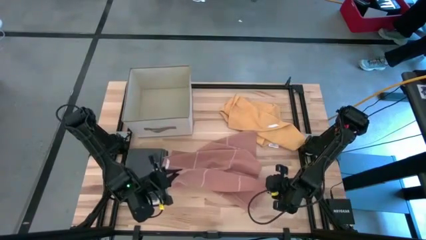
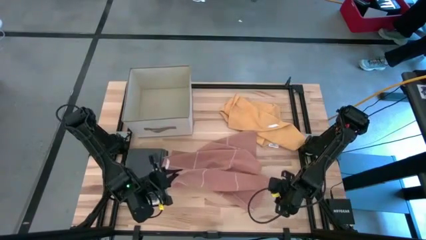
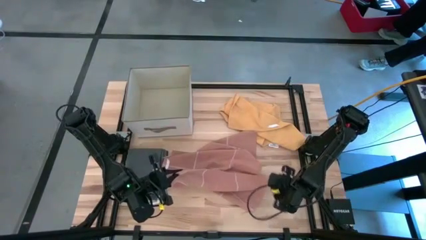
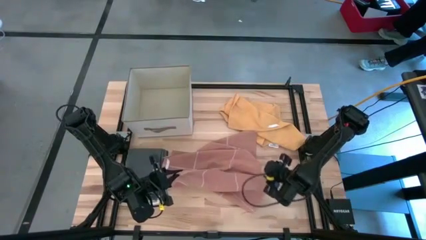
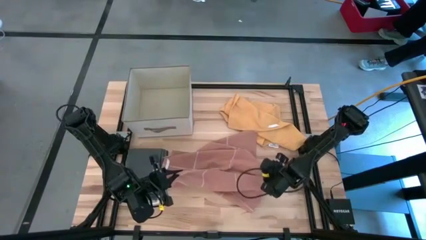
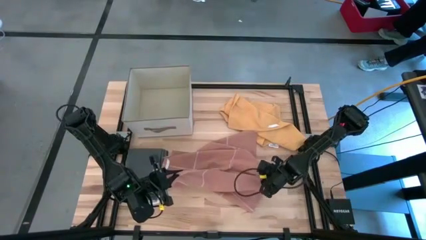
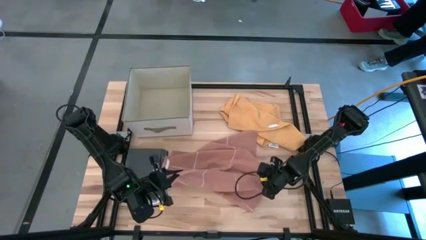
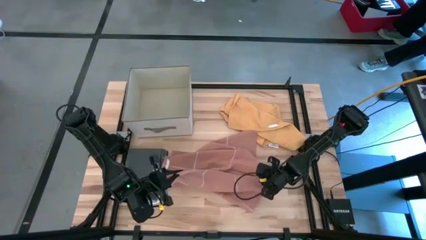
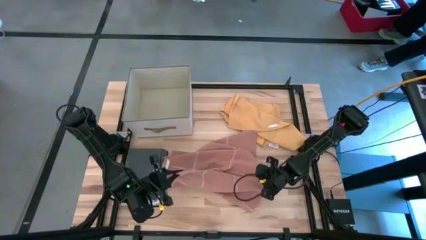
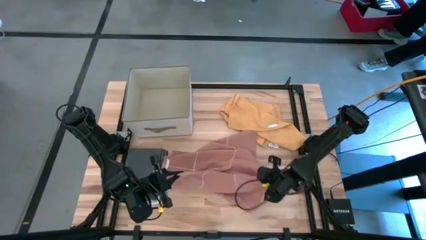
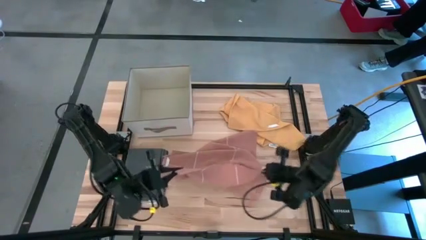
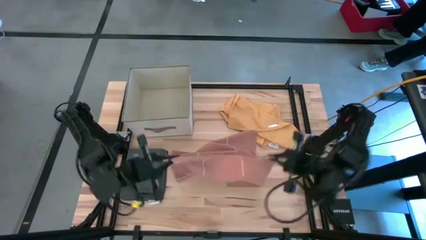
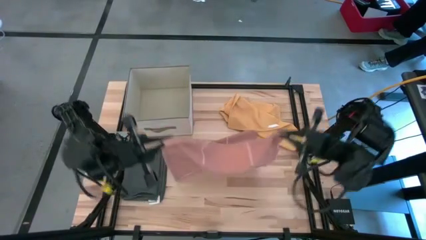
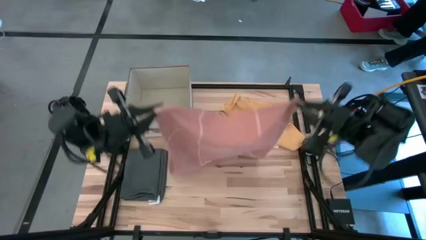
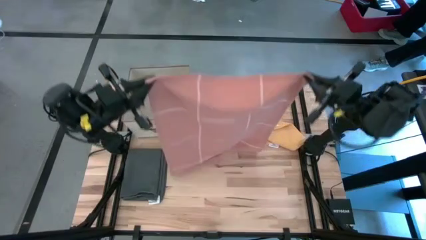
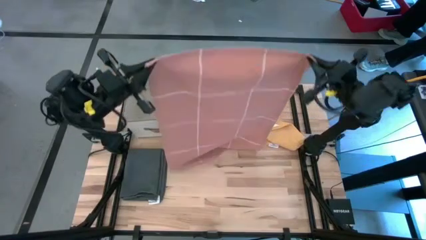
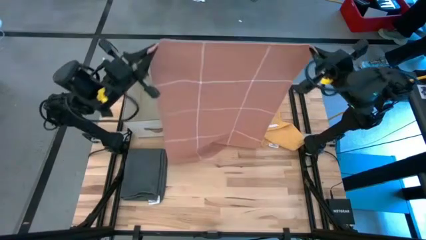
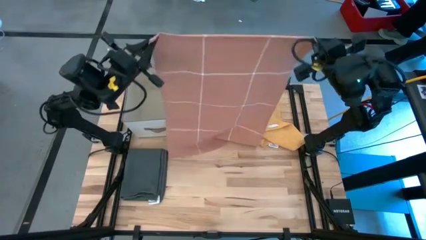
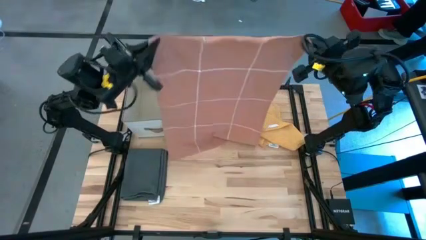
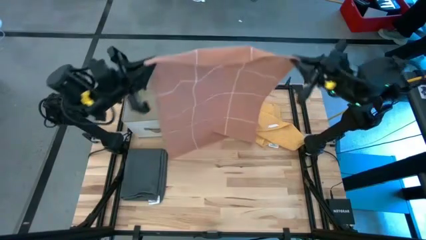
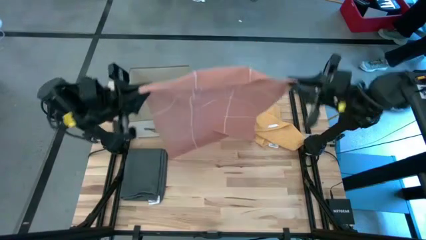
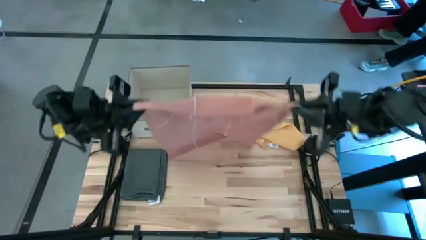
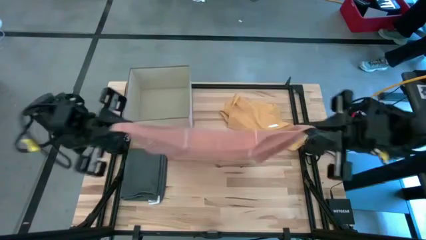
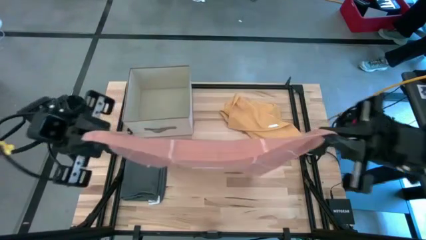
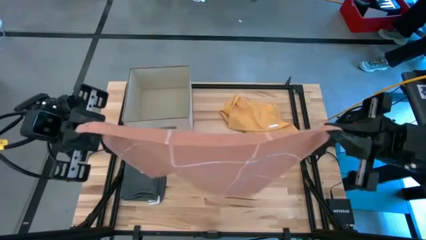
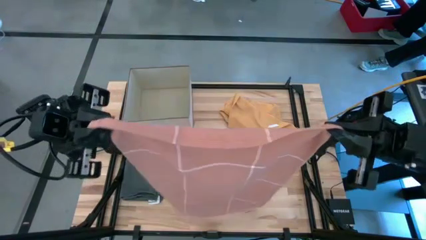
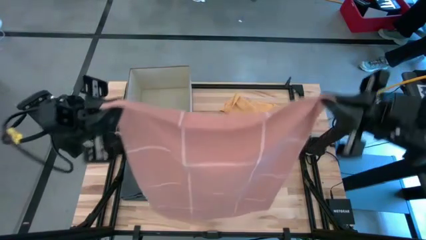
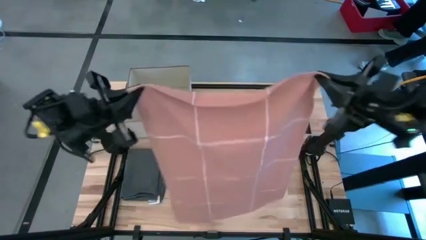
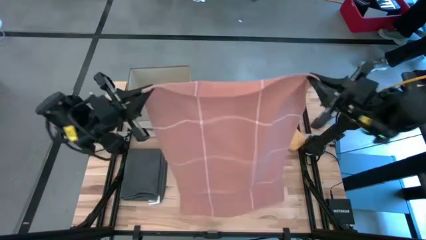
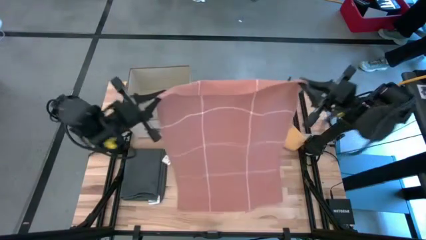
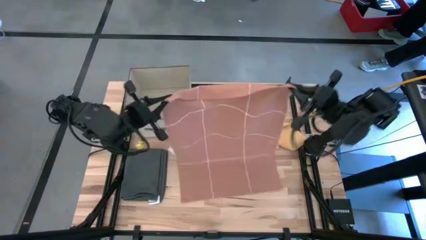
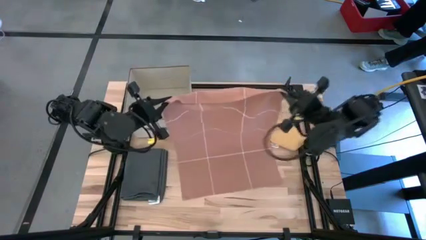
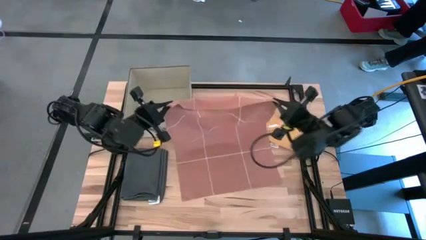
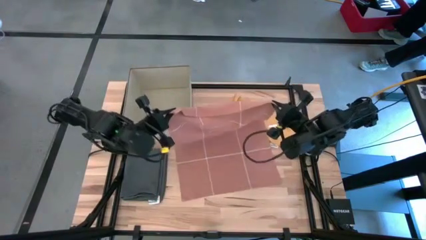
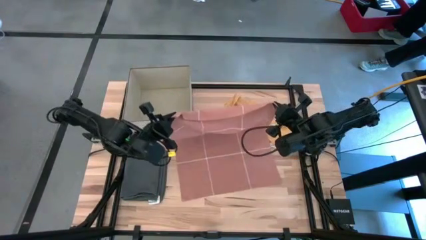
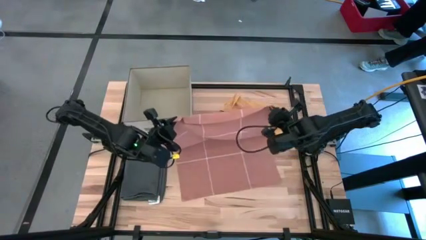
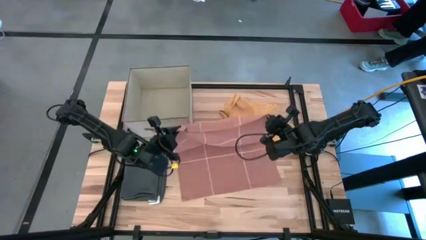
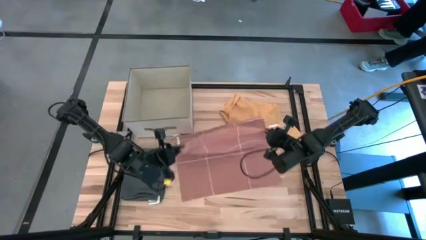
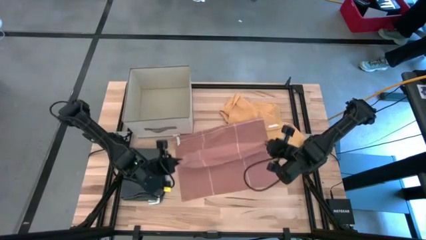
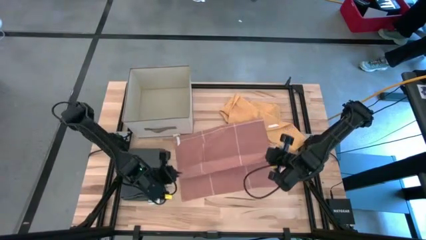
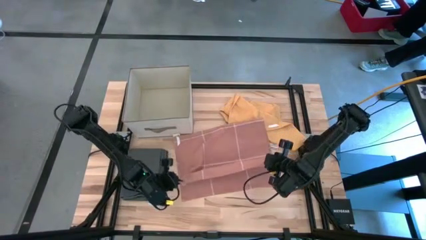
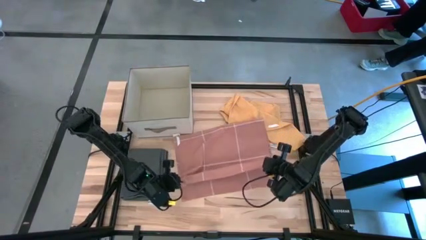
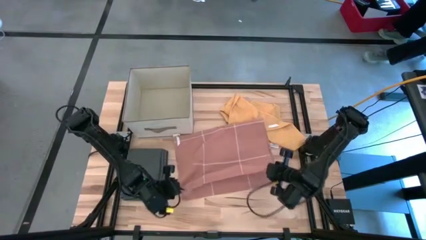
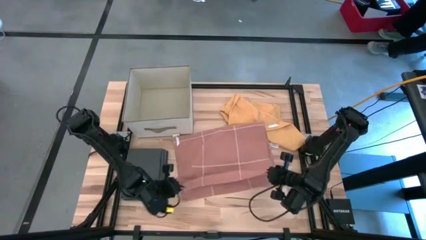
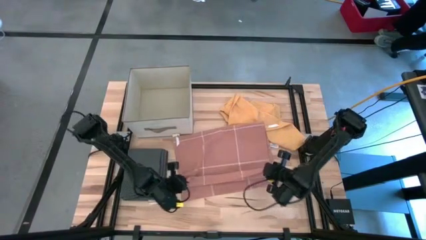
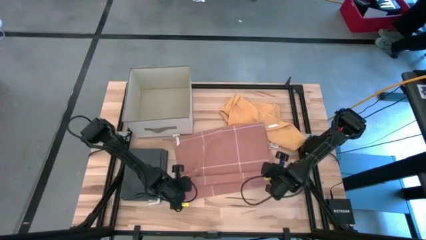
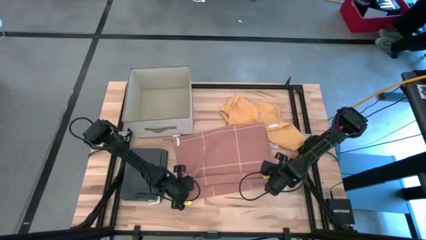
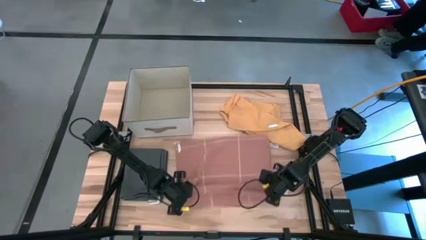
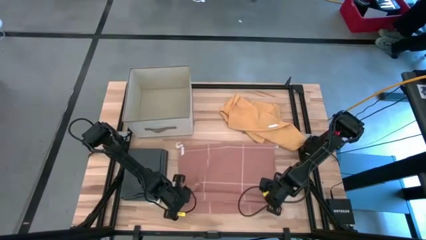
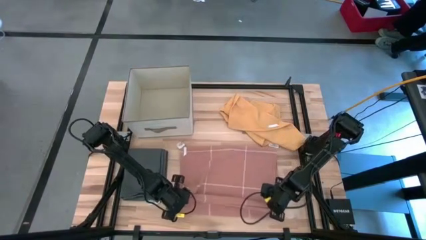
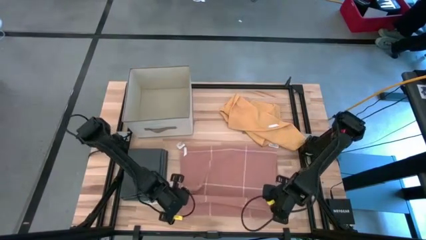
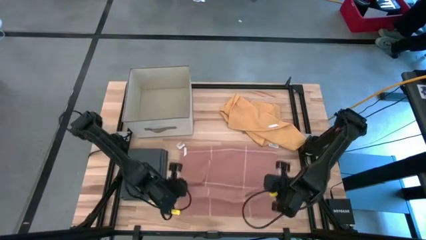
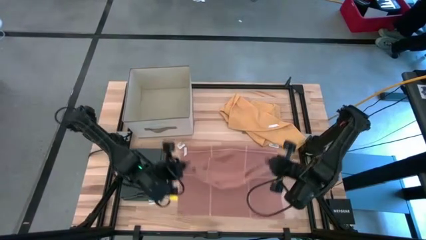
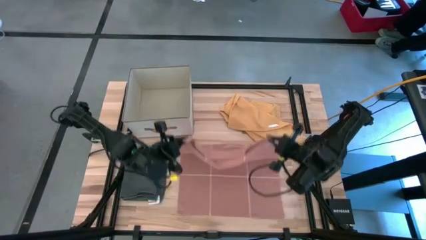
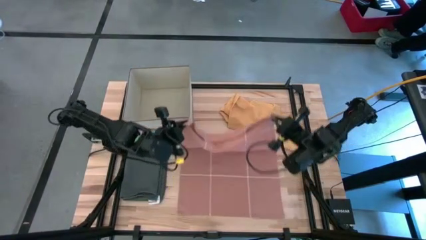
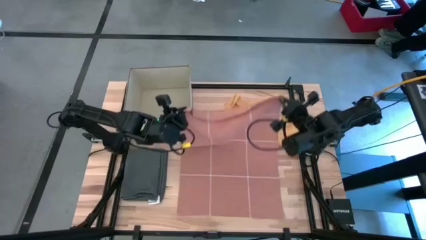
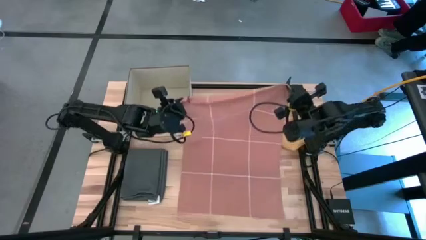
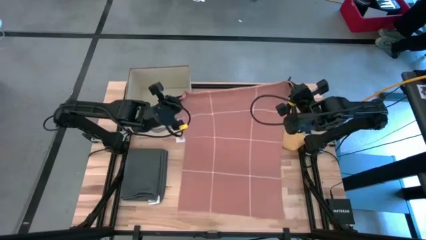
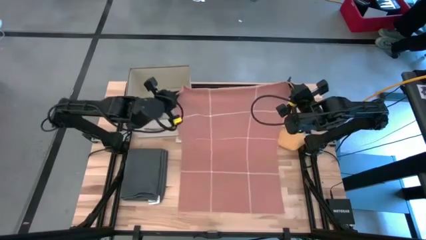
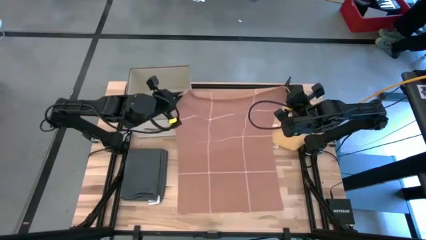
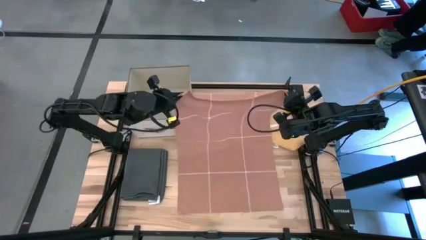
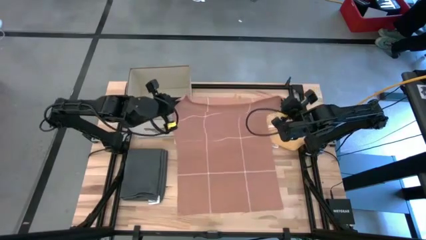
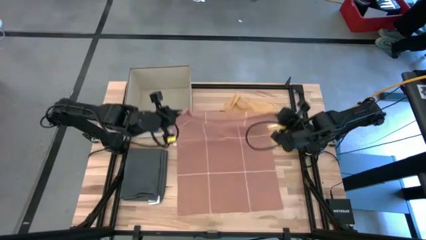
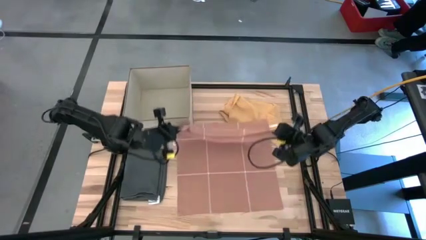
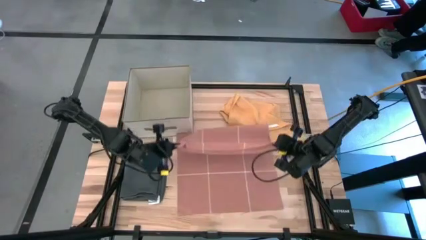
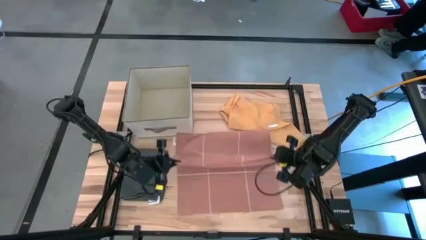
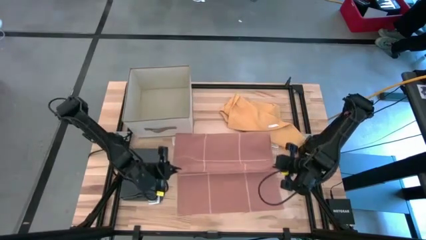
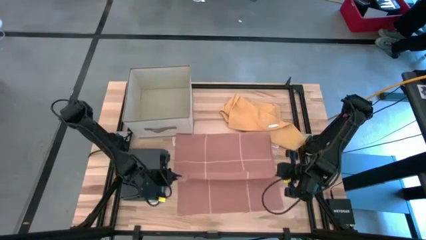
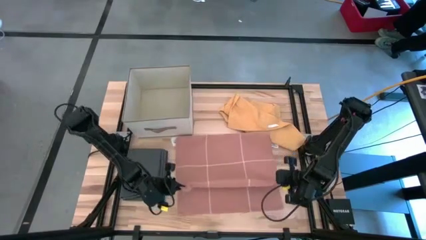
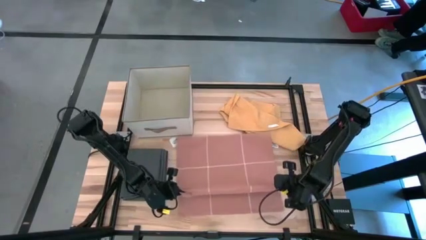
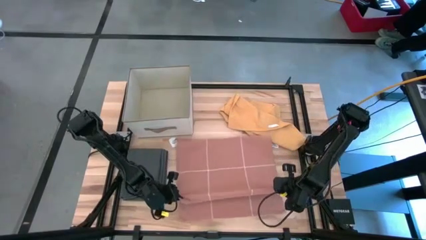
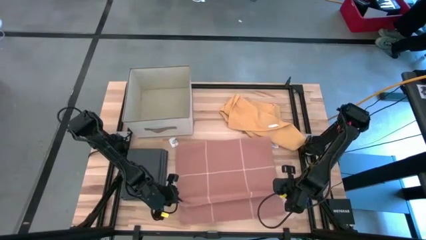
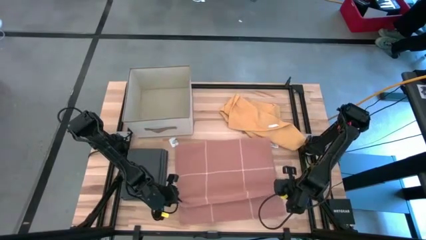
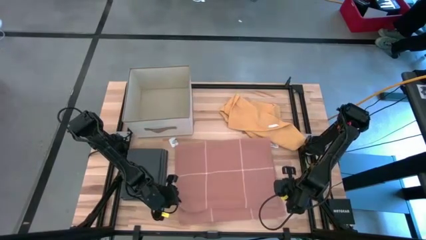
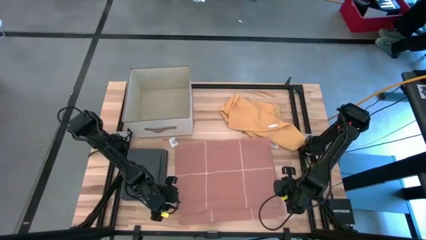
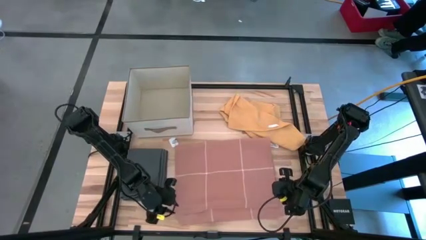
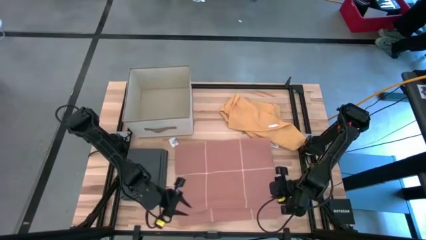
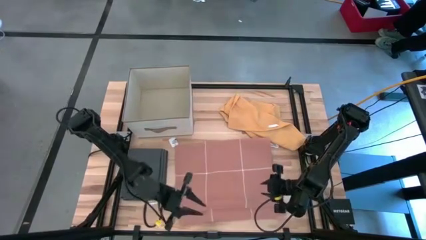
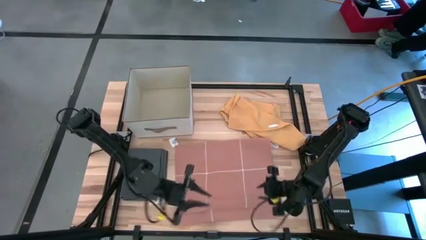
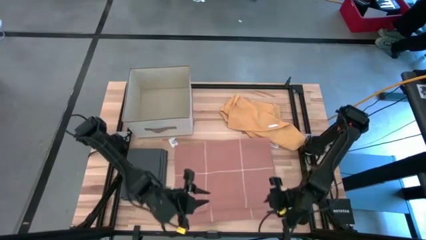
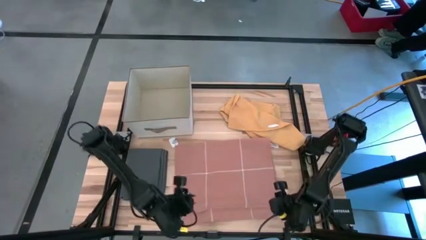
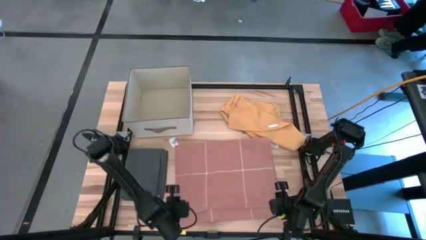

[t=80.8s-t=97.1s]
Task: Fold towel
Fold the light orange towel
